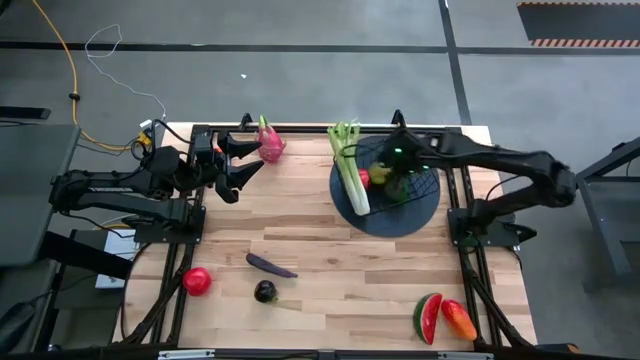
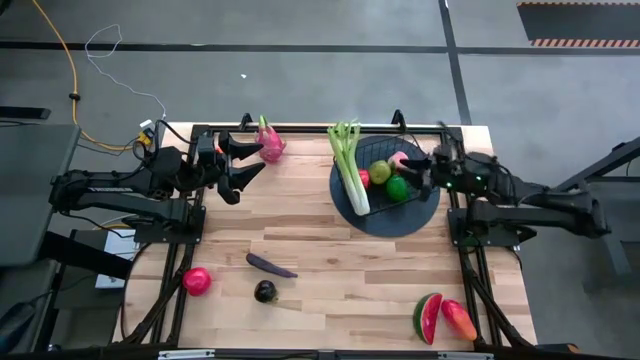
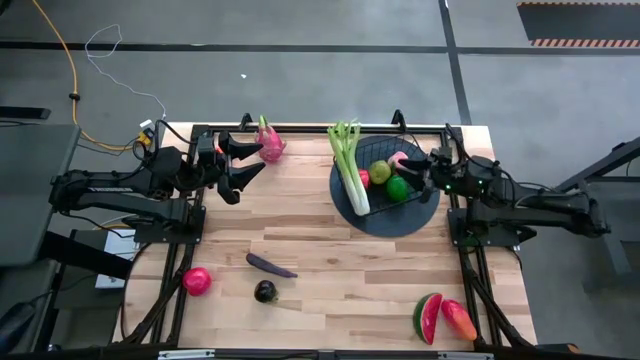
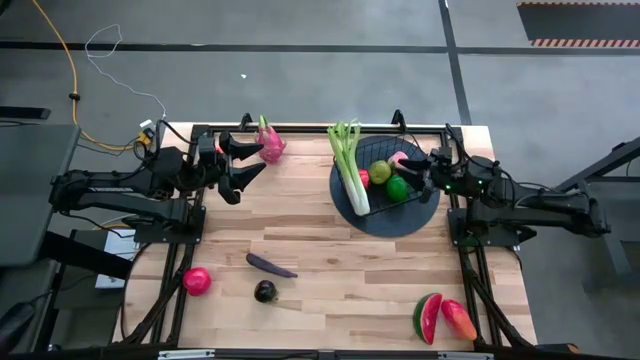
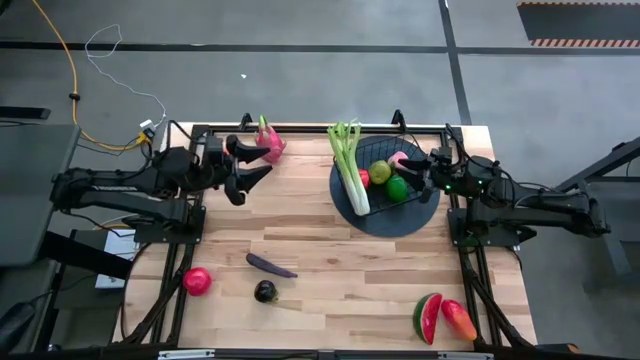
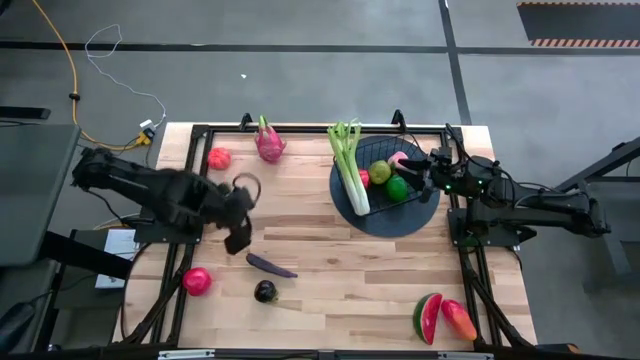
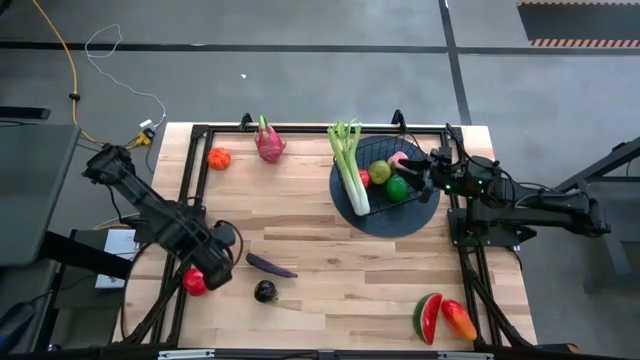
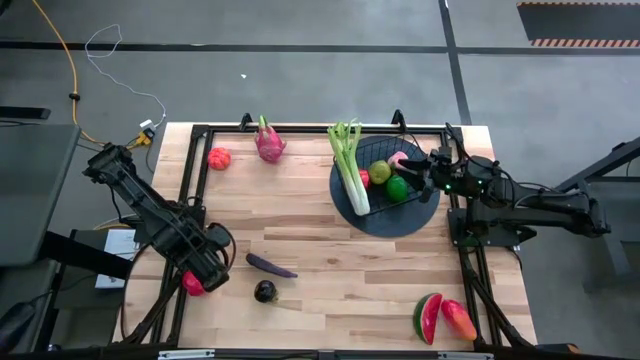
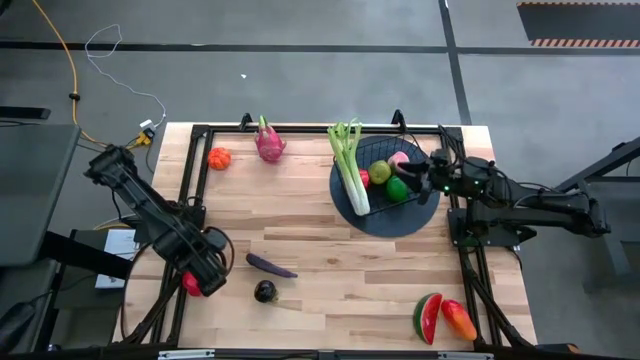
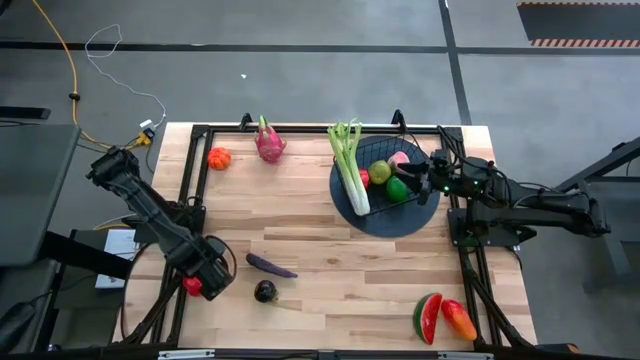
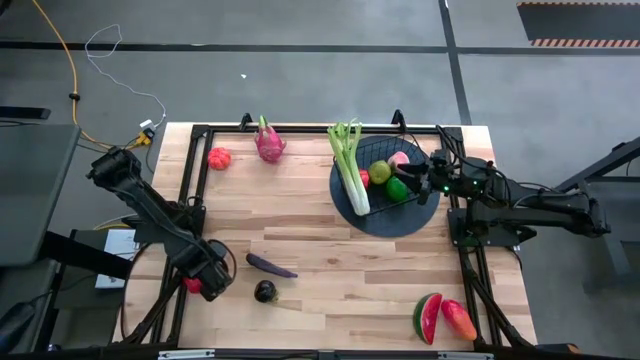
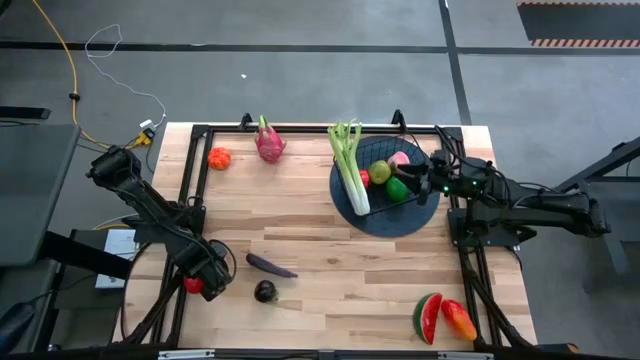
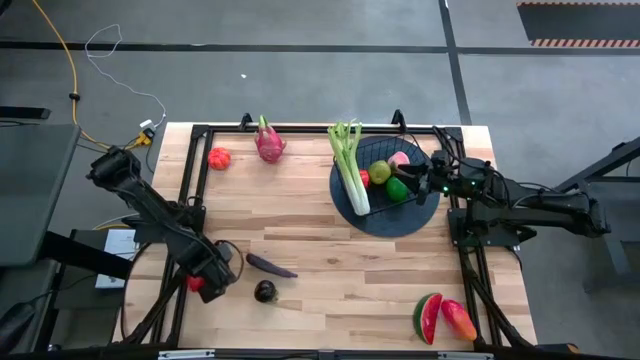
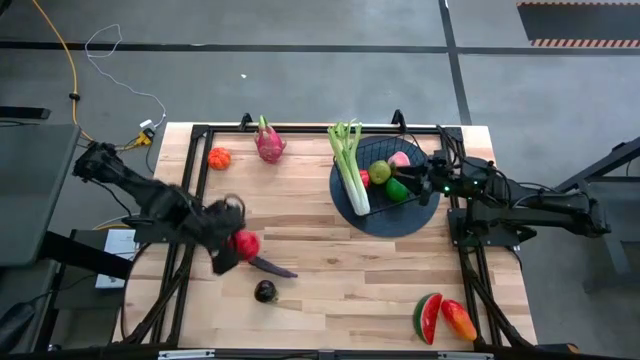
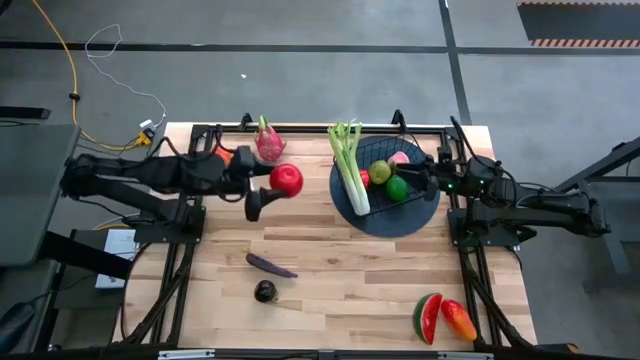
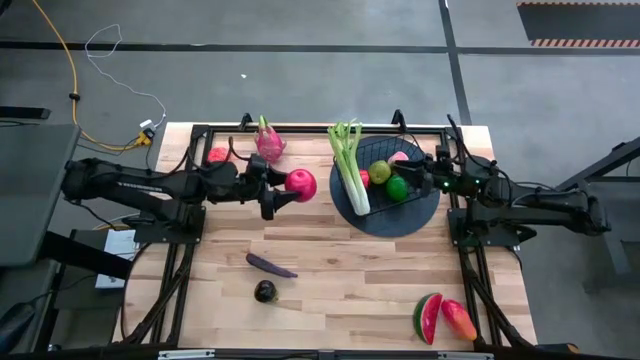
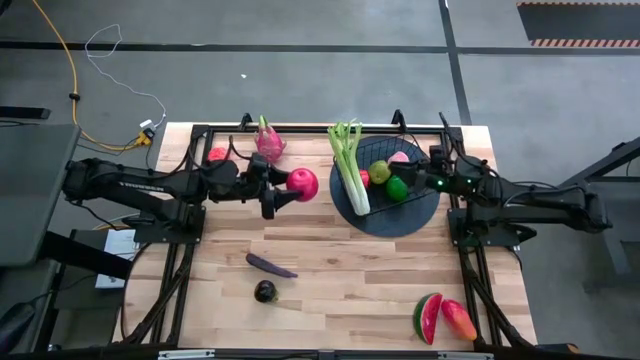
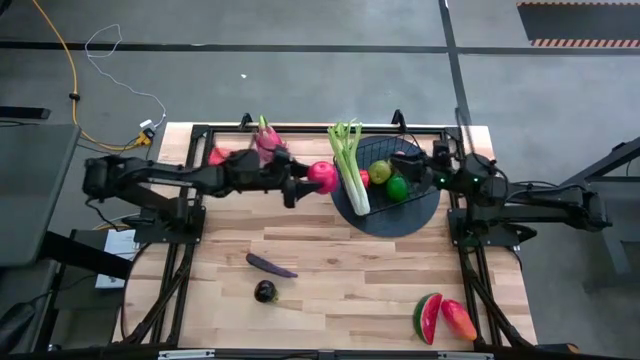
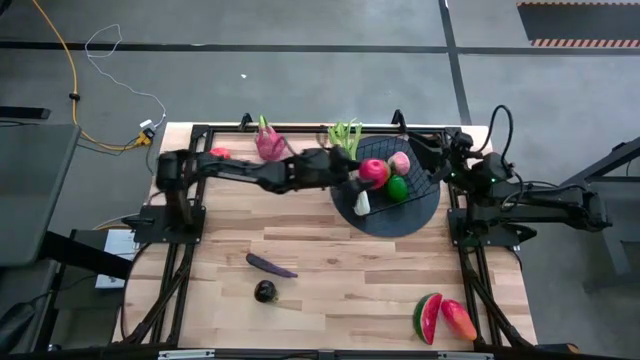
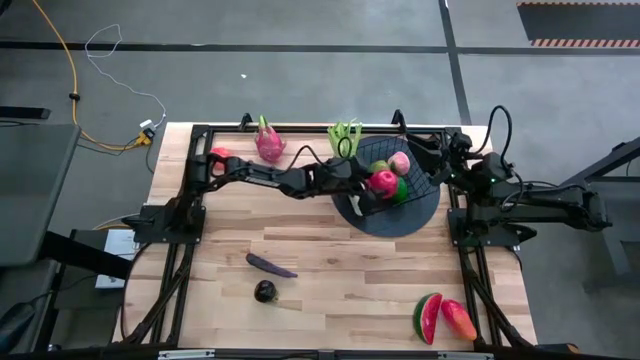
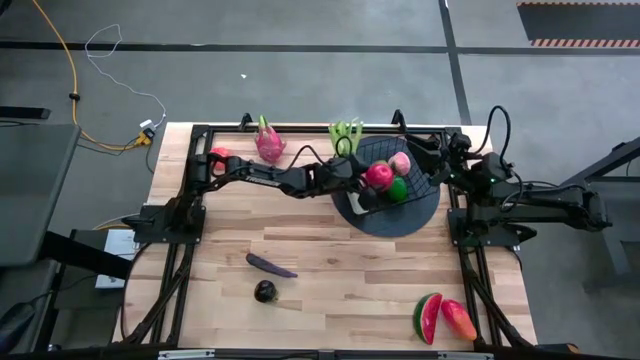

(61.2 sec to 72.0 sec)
Task: Build produce basket
Put the apple into the wire basket

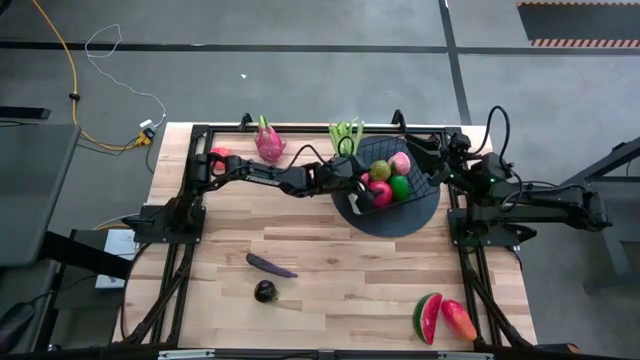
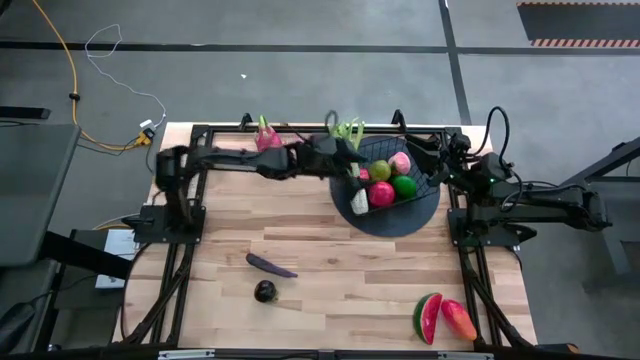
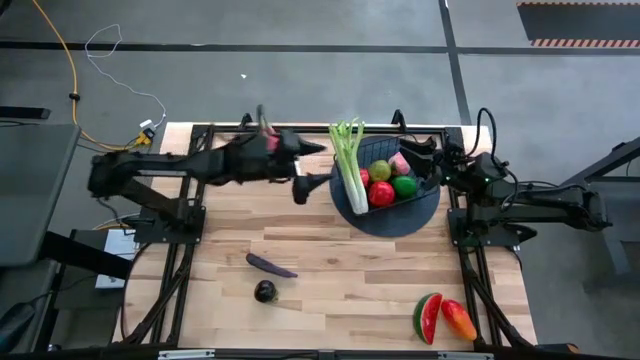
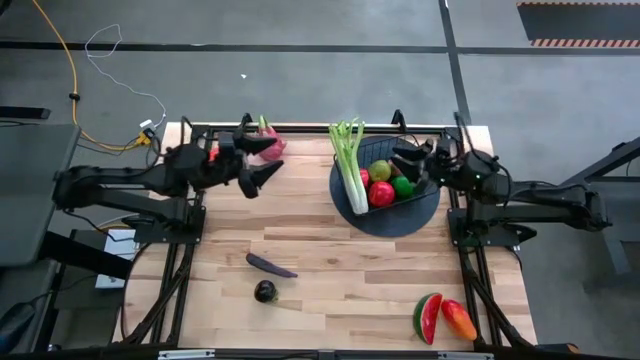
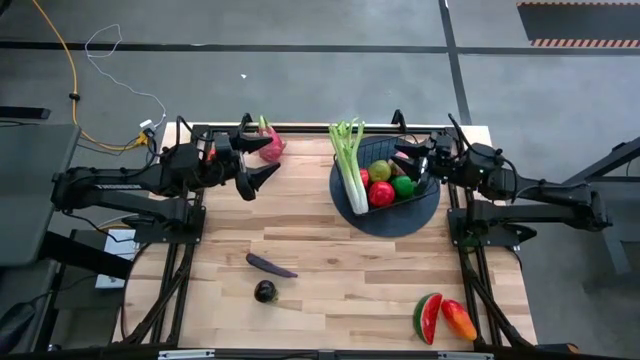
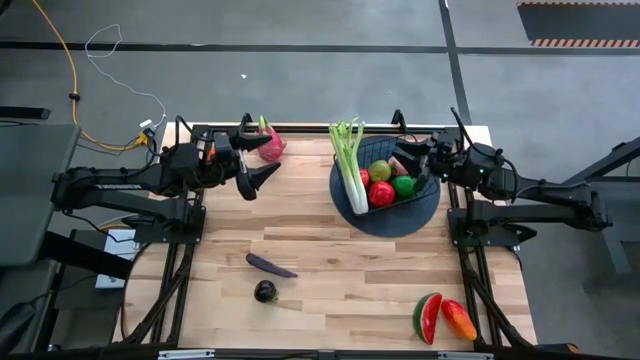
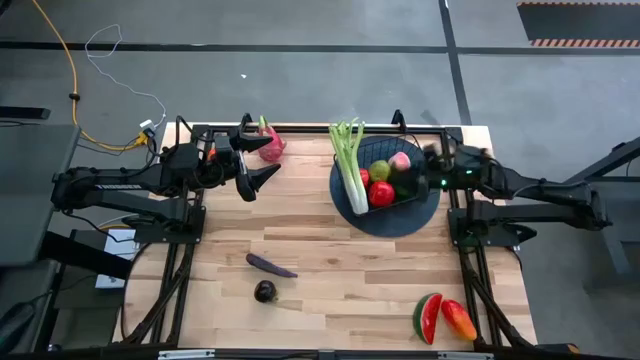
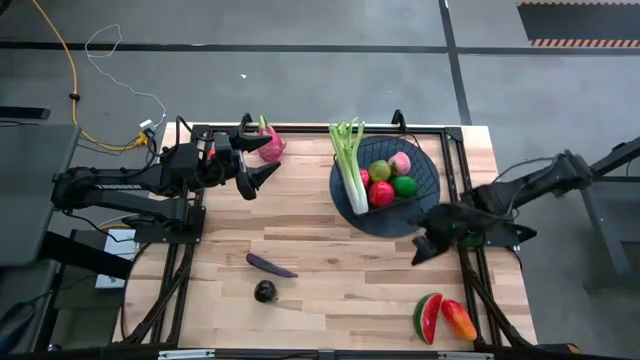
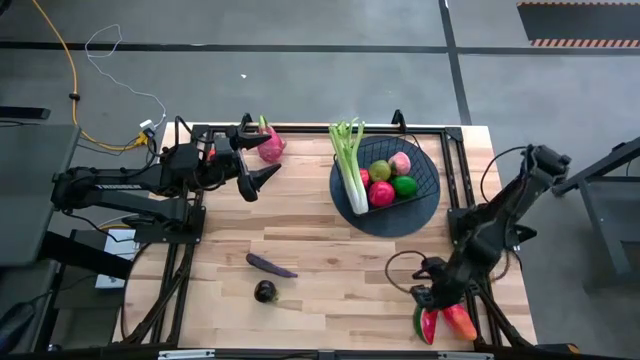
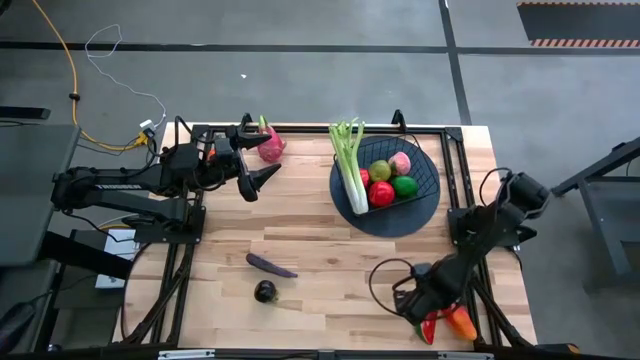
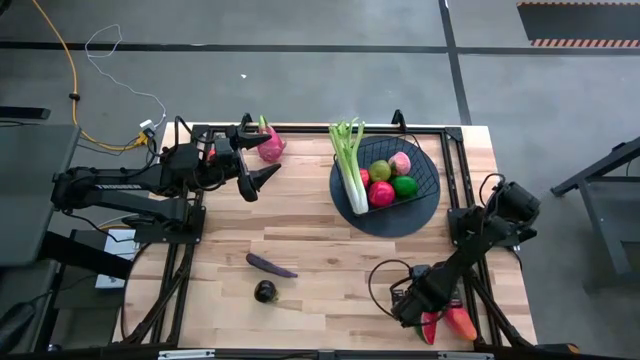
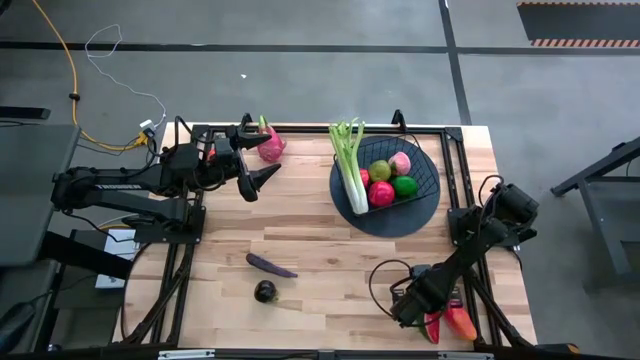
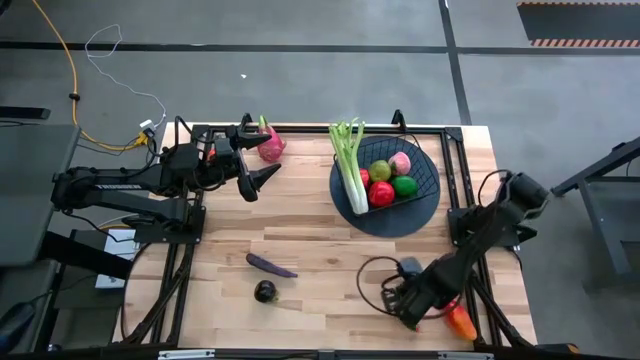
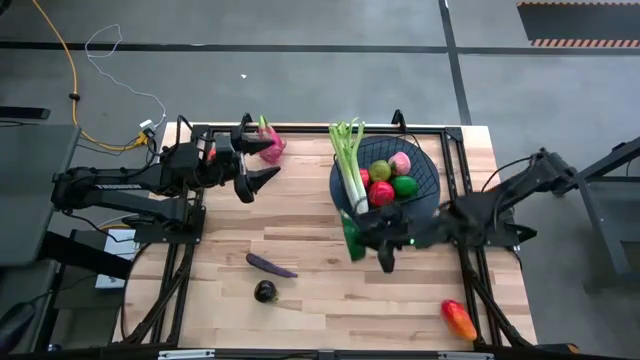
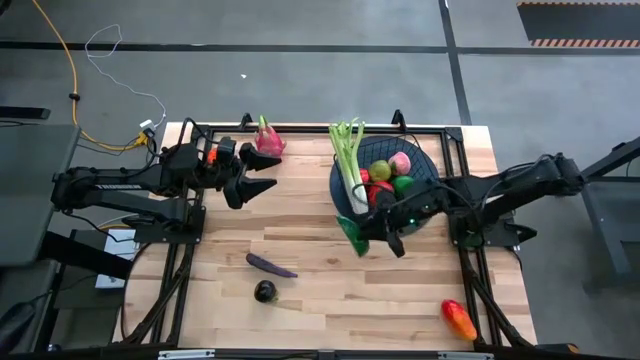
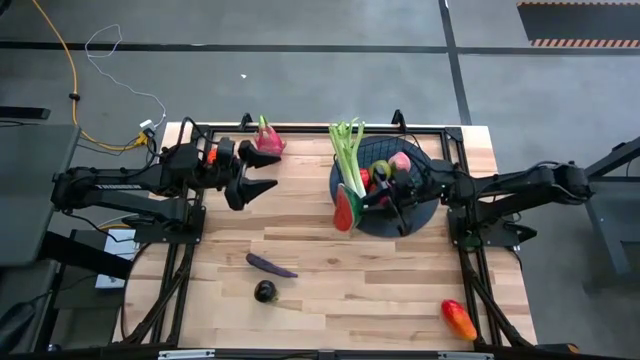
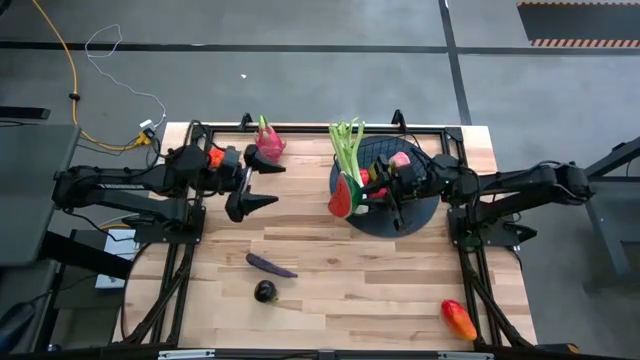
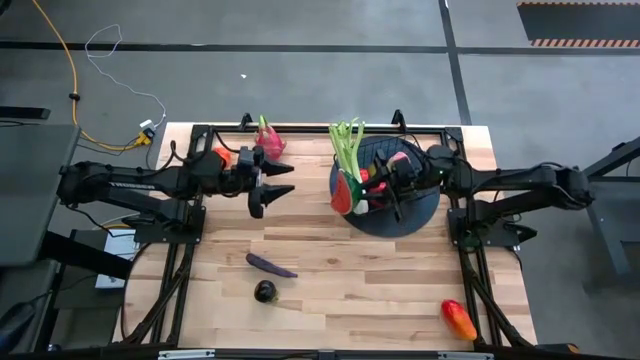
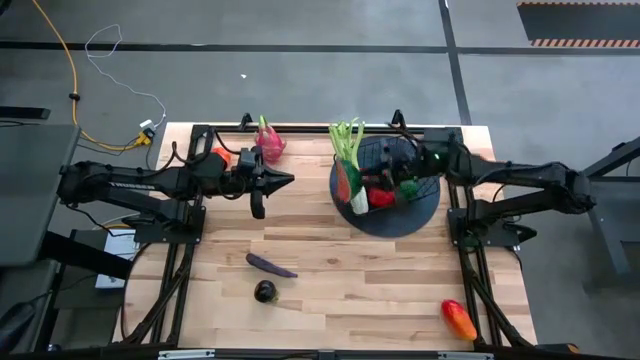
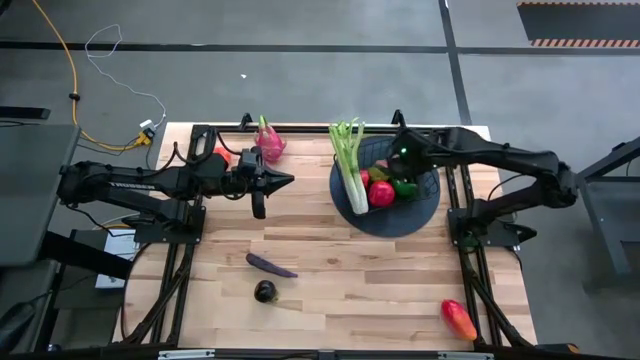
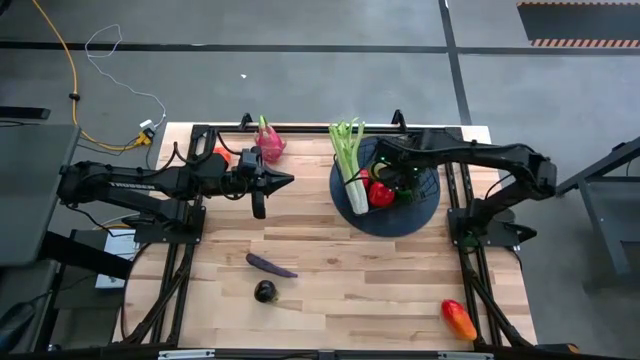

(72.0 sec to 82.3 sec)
Put the watermelon into the wire basket

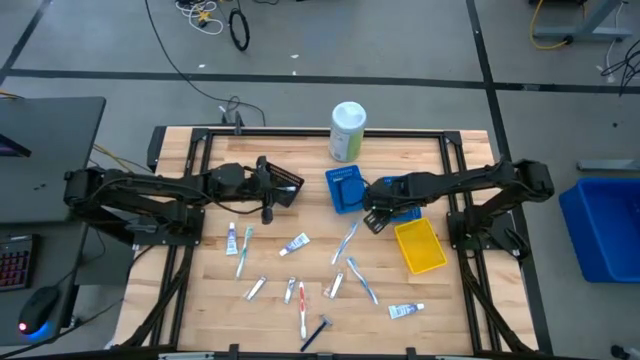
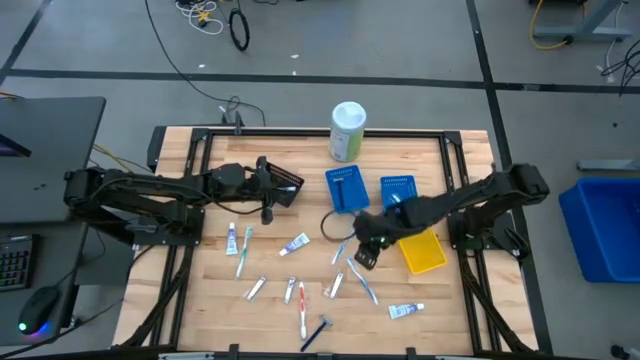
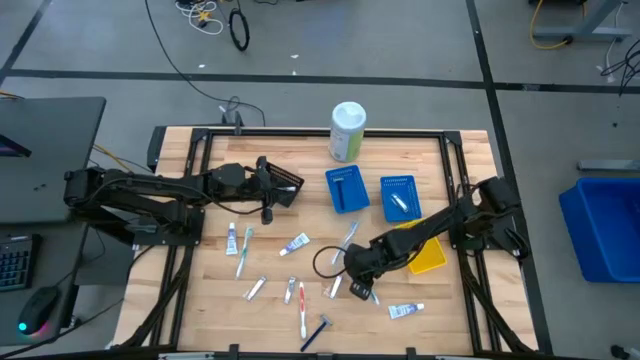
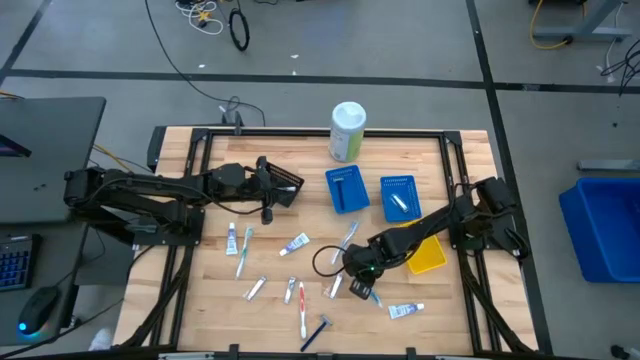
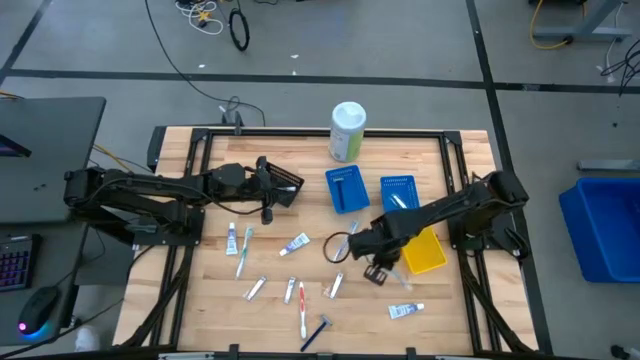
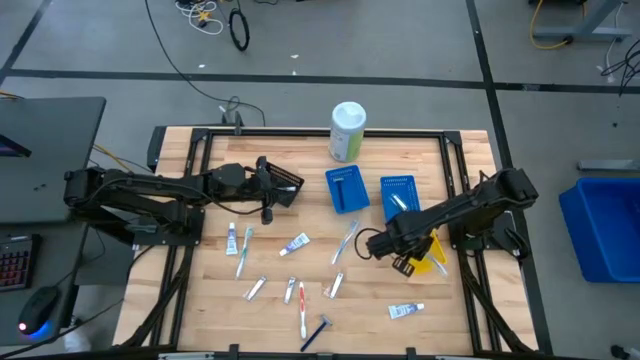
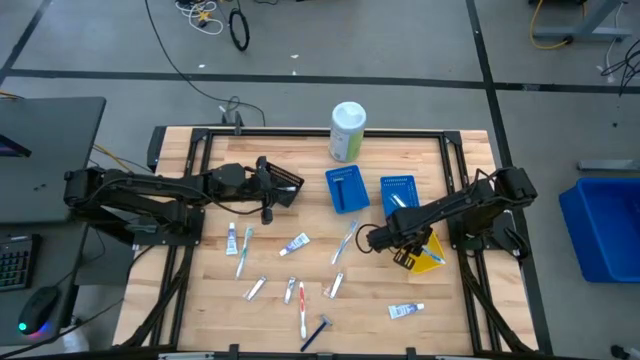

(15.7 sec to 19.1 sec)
Task: Pick & Place Travel size toiletries
Put the blue toothbrush into the yellow basket
